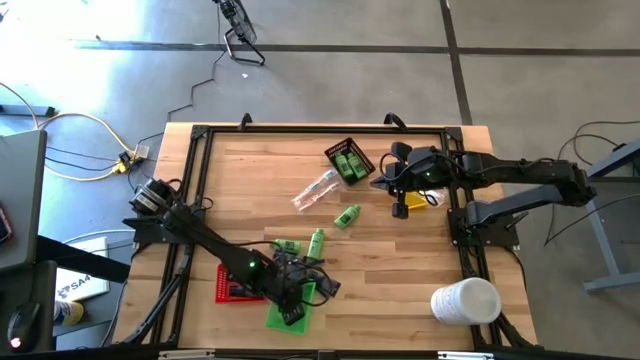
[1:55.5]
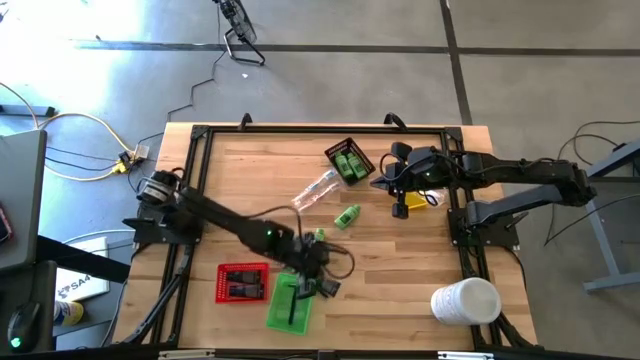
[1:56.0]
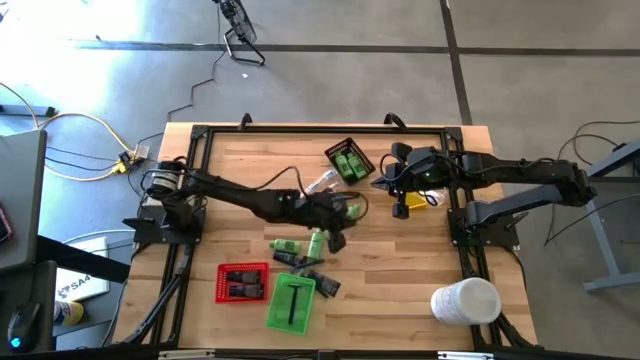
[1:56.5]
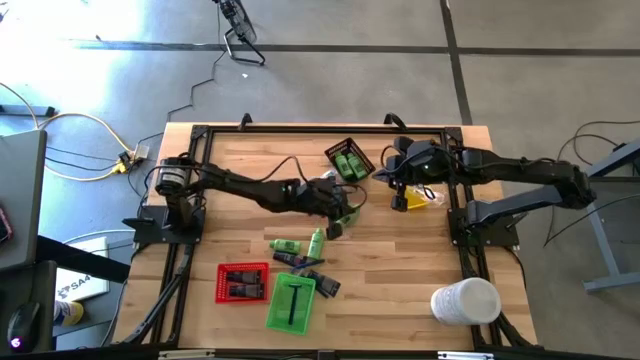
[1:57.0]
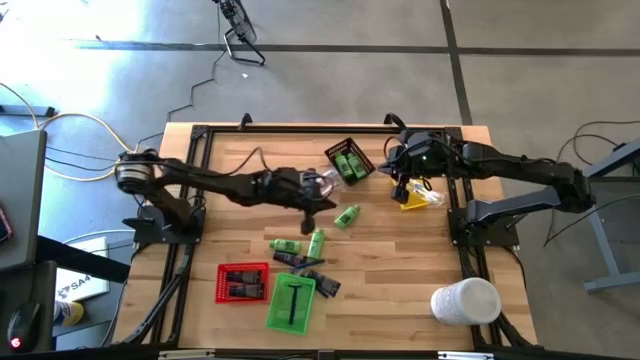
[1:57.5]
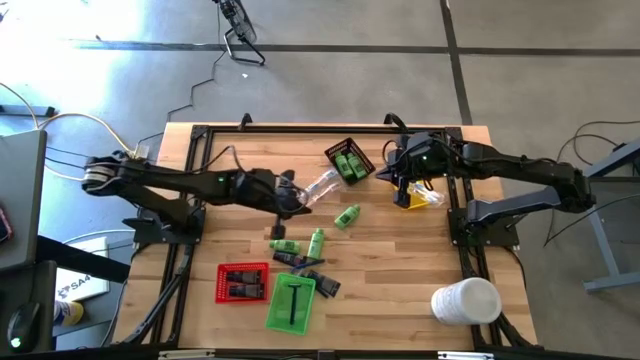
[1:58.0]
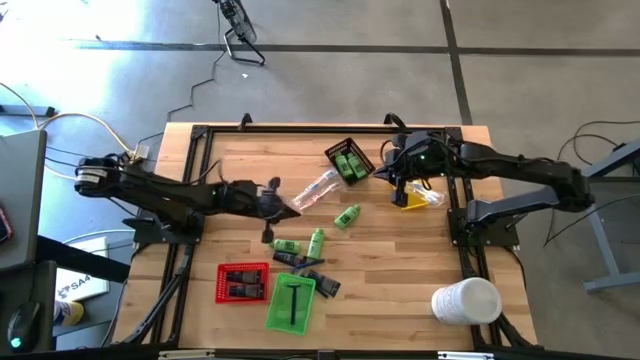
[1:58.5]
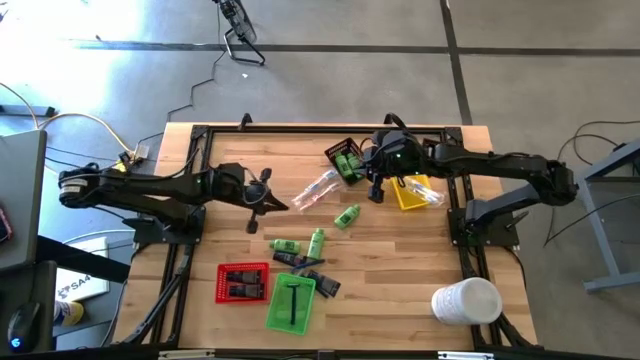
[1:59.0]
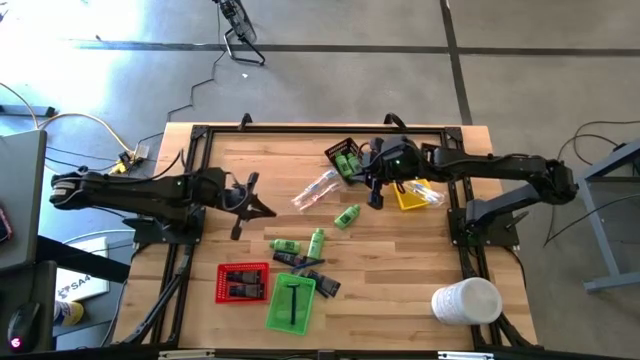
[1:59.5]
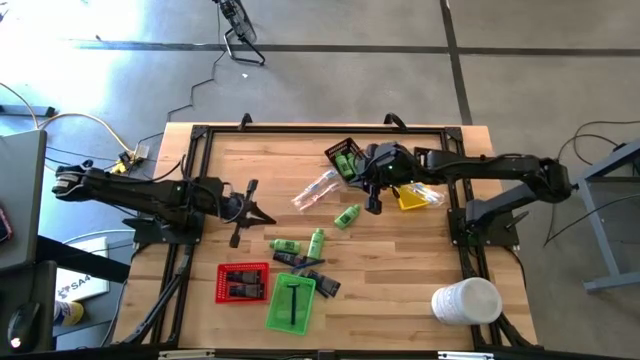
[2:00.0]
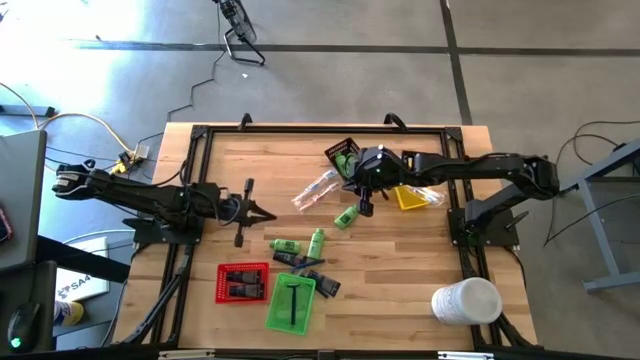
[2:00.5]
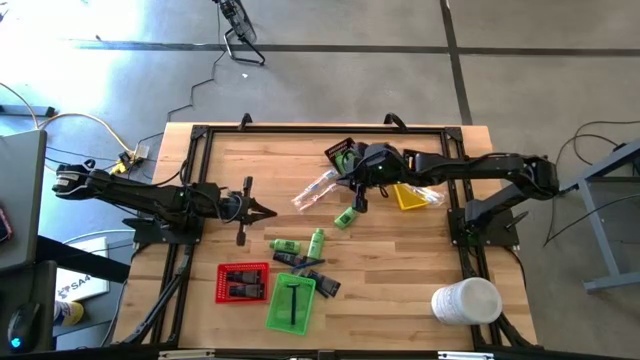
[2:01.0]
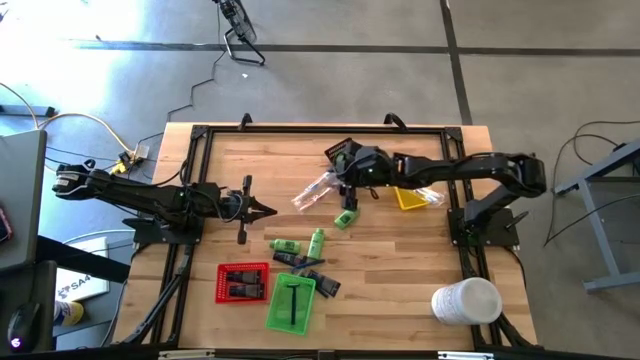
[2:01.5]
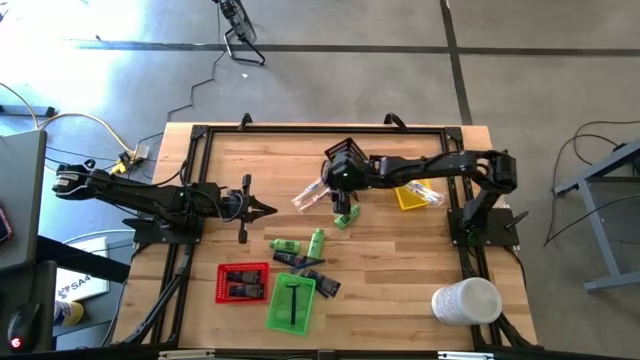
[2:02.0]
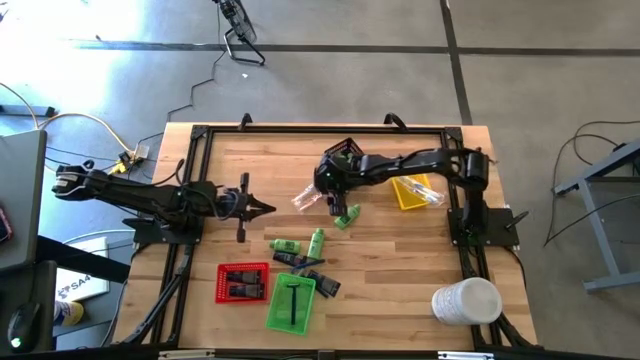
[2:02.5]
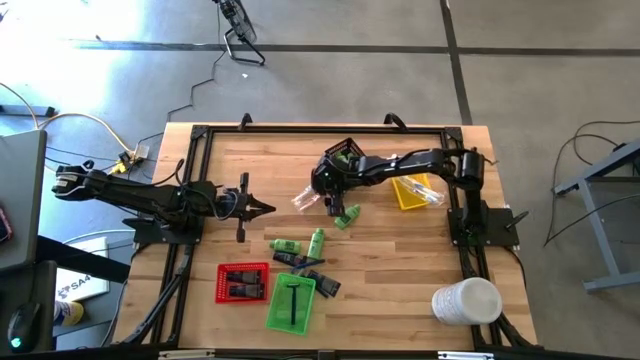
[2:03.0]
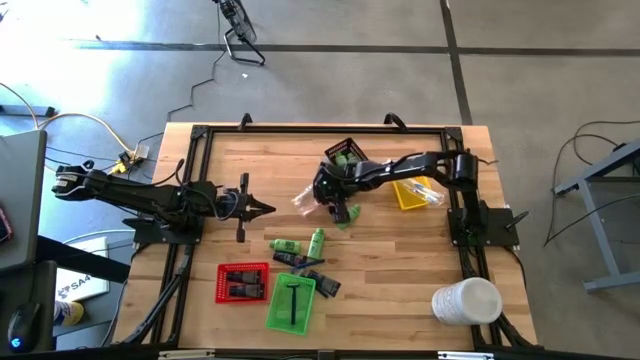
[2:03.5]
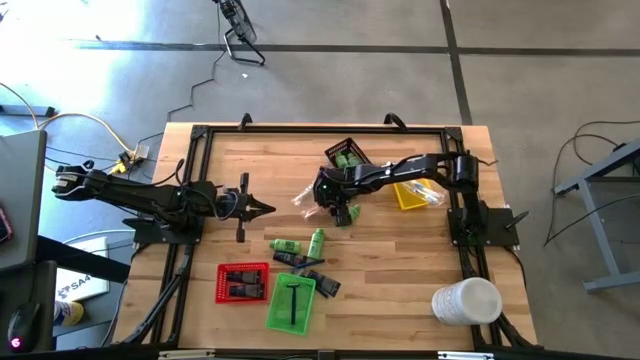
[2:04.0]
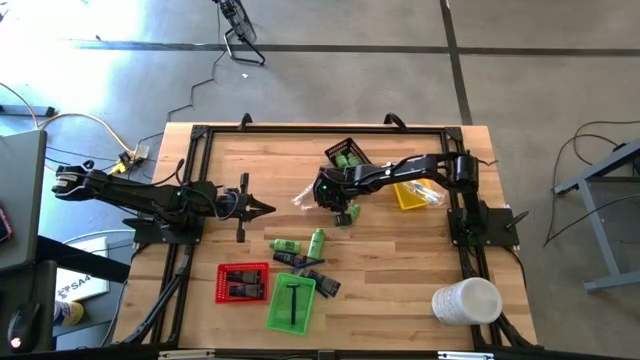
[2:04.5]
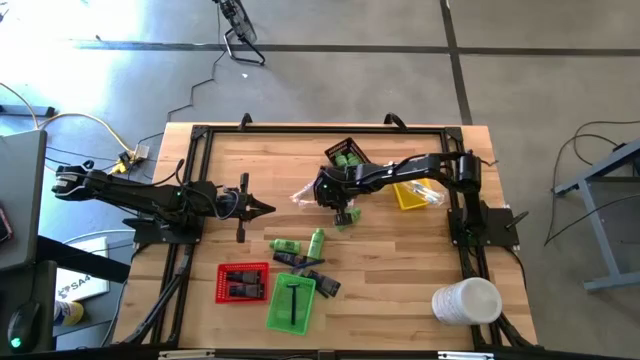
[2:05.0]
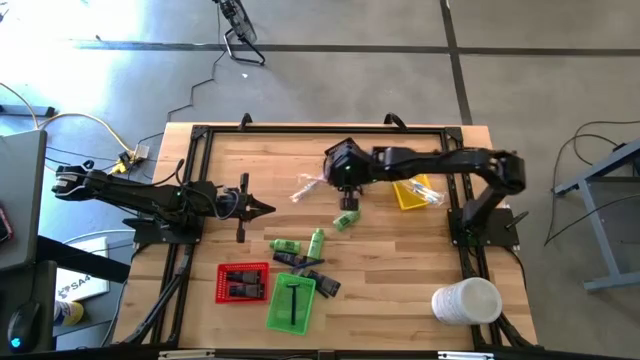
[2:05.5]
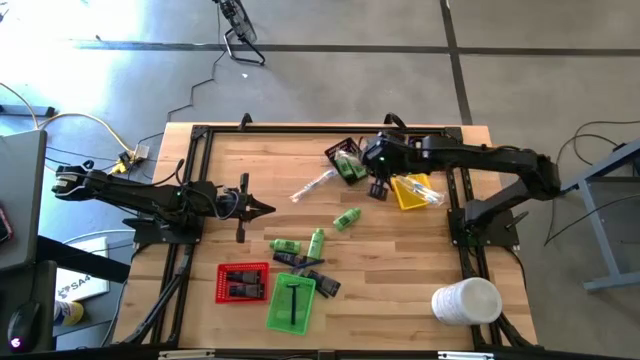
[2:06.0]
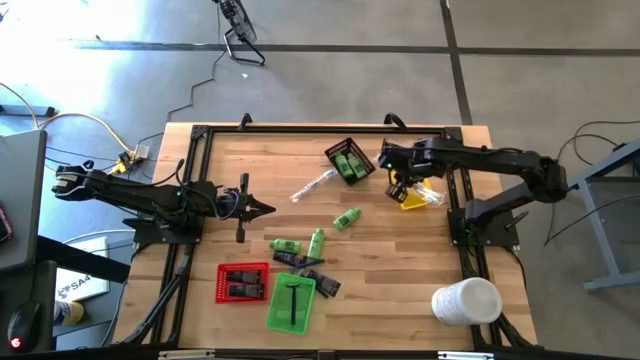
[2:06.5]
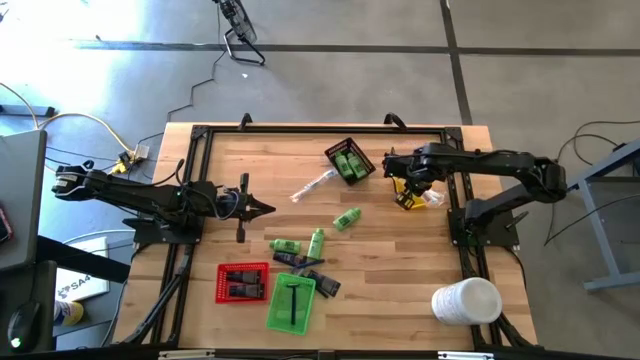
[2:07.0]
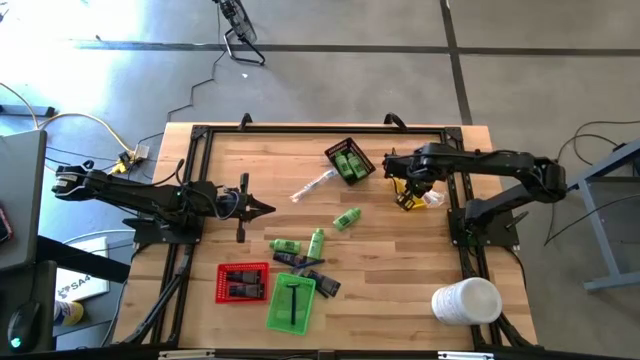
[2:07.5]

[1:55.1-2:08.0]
Task: Pick & Place Travel size toiletries
Put the red toothbrush into the yellow bin

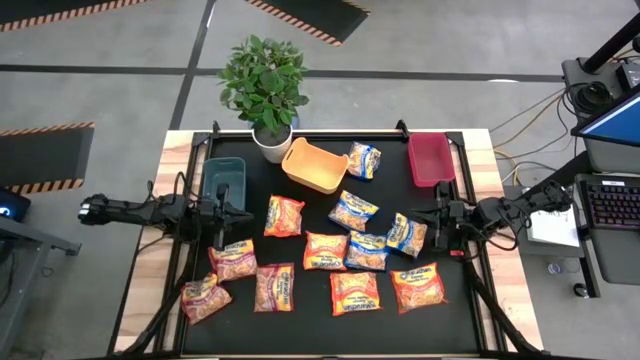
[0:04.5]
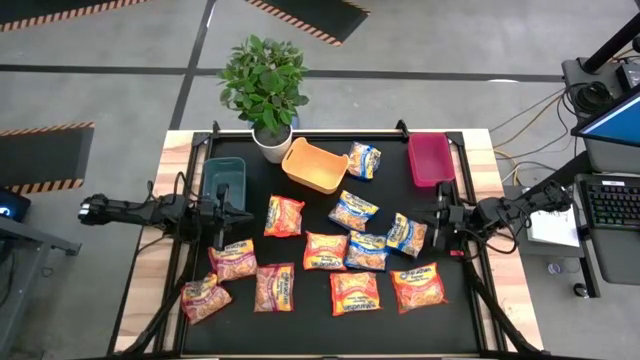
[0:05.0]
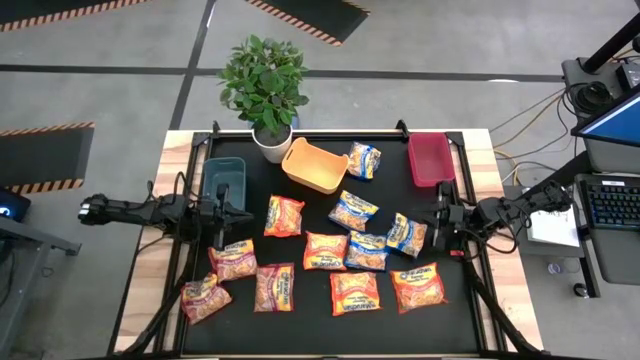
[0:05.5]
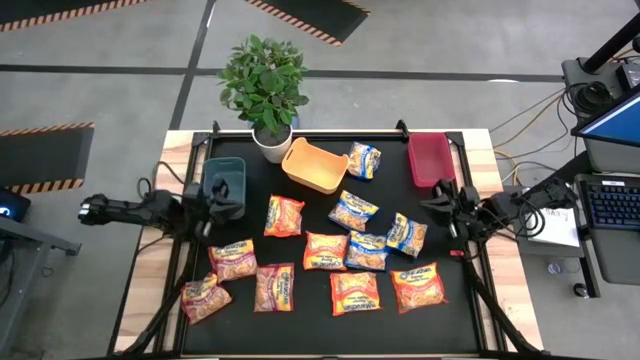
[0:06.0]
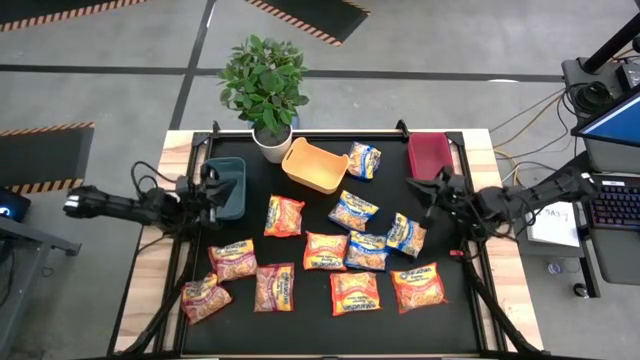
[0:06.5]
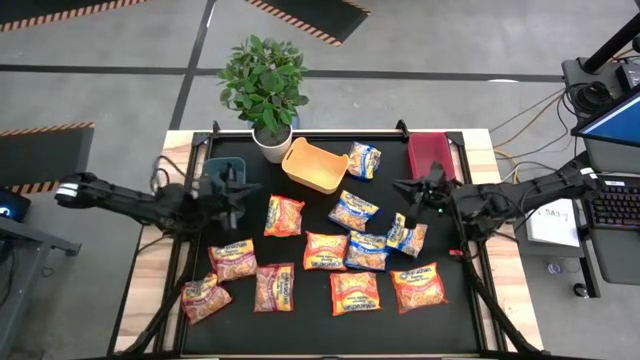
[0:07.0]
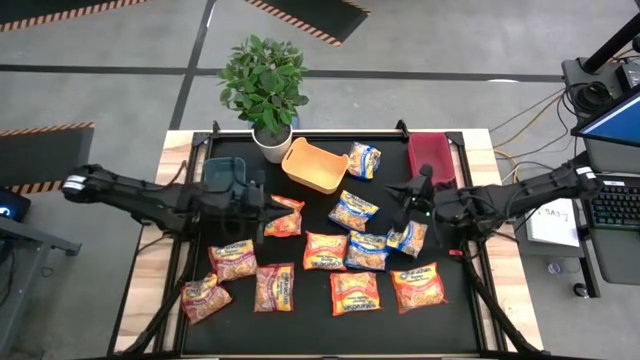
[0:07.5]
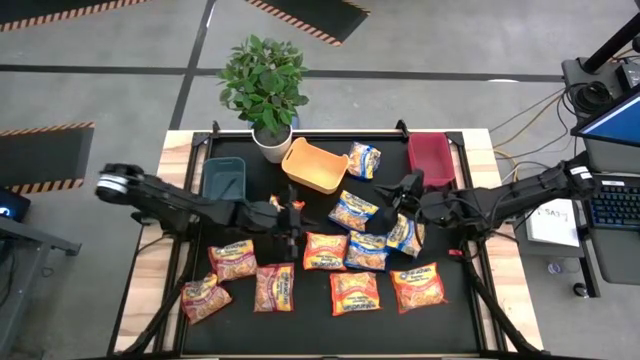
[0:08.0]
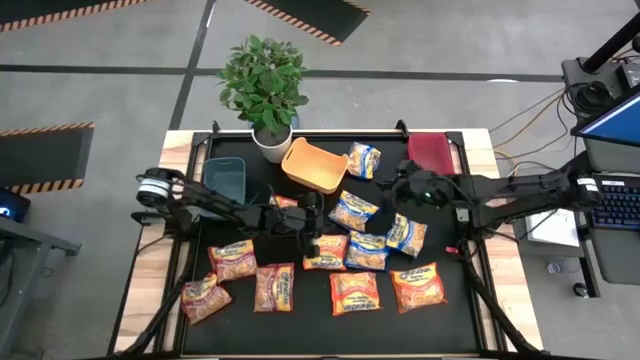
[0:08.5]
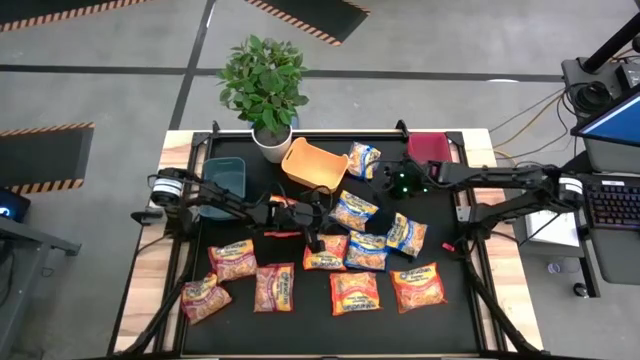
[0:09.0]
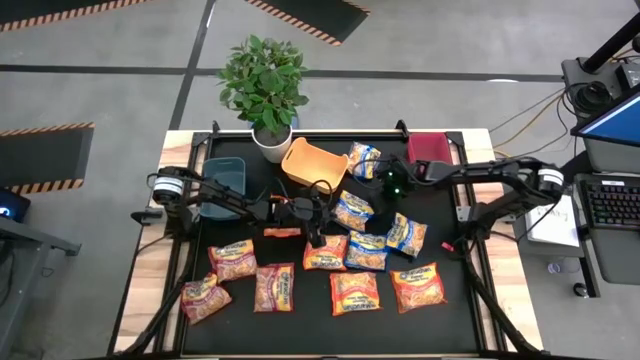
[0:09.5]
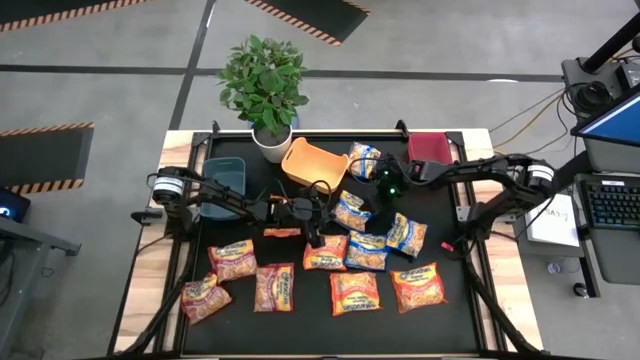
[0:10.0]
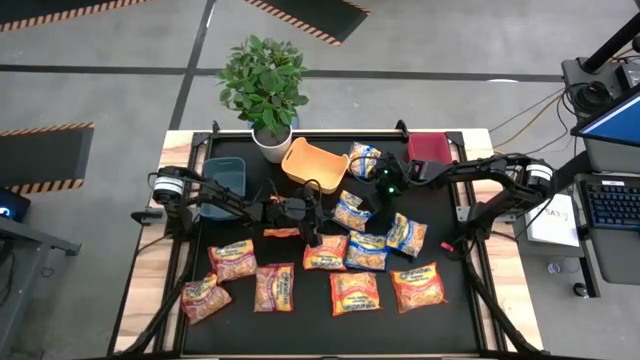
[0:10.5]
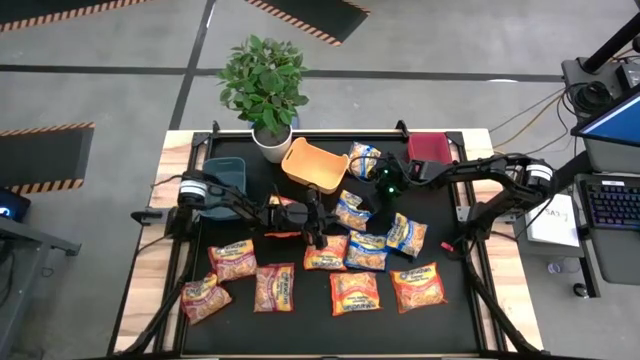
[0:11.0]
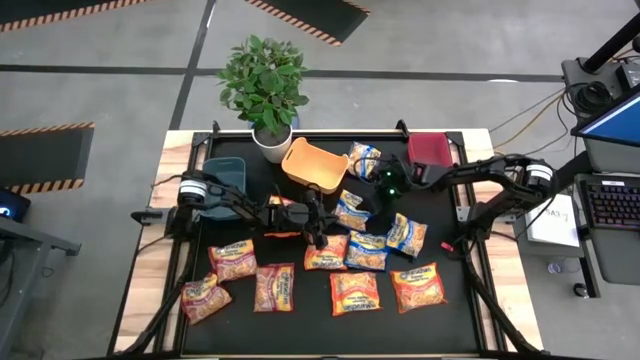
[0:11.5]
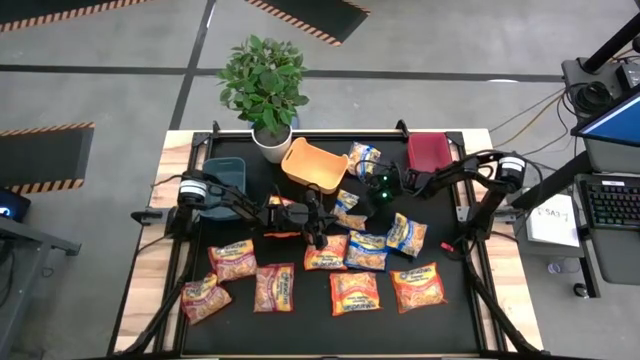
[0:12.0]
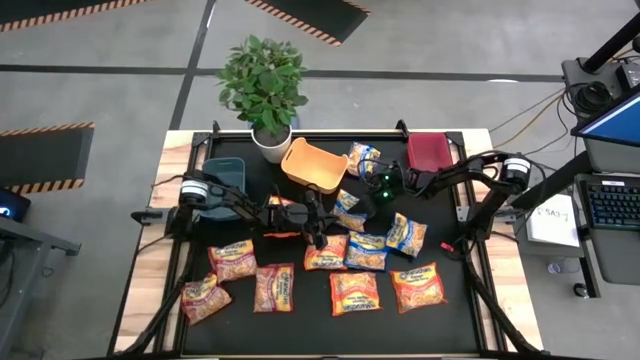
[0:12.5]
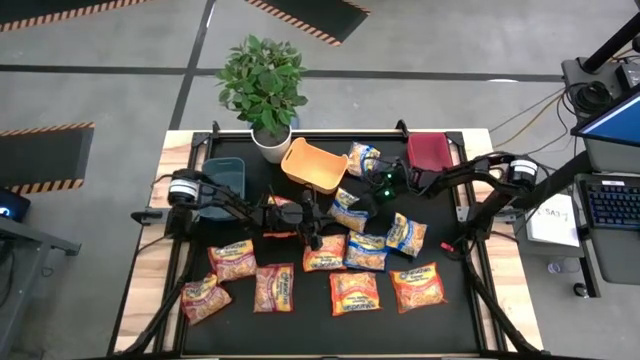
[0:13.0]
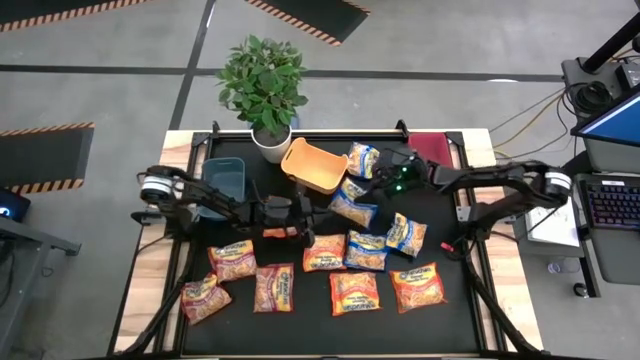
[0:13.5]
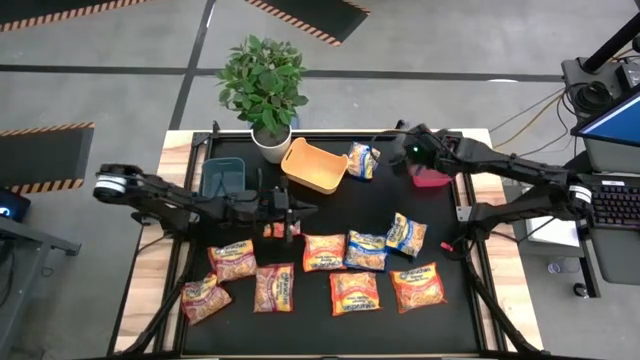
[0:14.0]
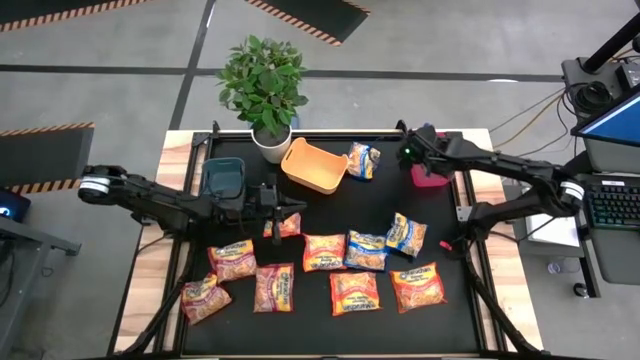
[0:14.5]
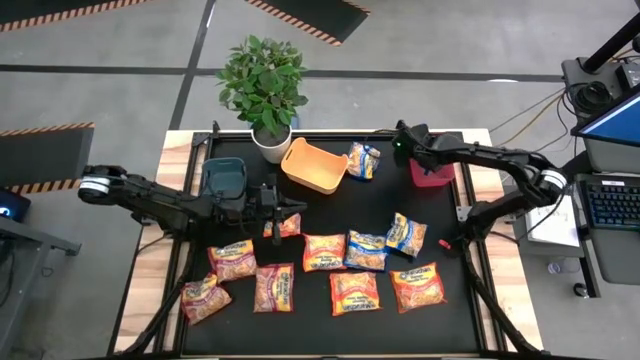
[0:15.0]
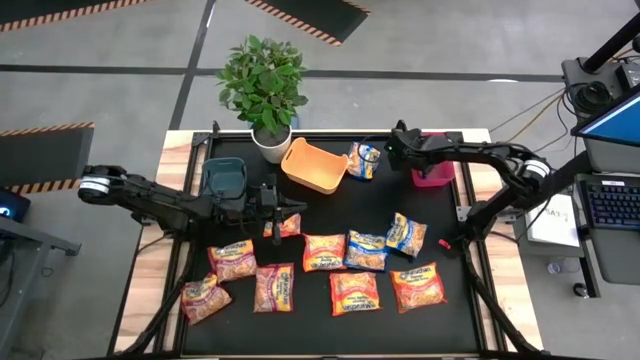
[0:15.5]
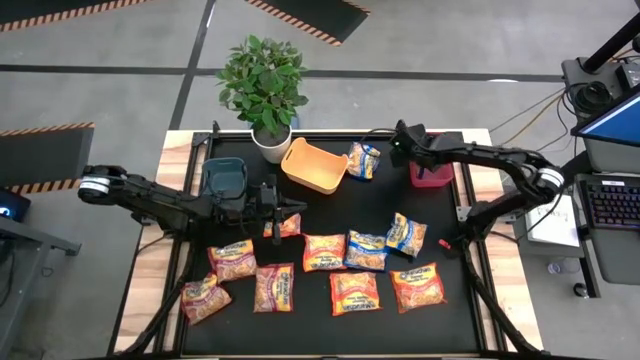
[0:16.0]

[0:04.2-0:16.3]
Task: Sort Maruchan noodles
Put the blue noodle pack into the red bin
